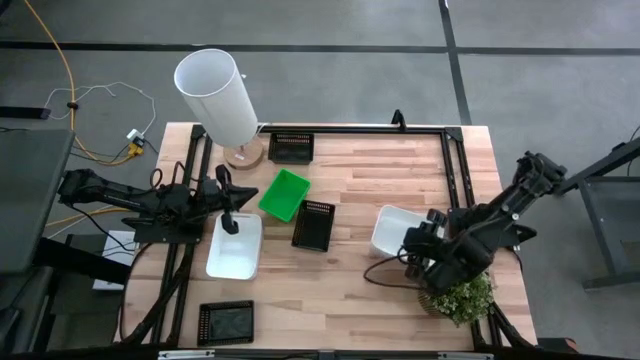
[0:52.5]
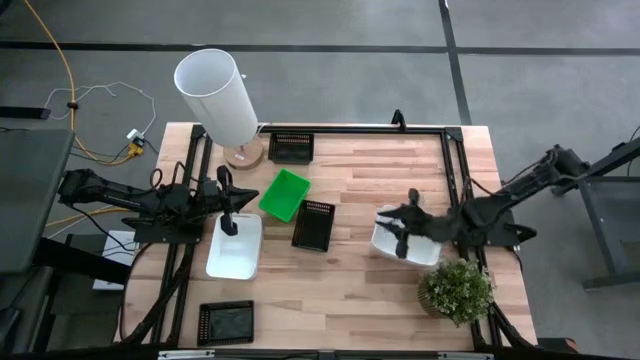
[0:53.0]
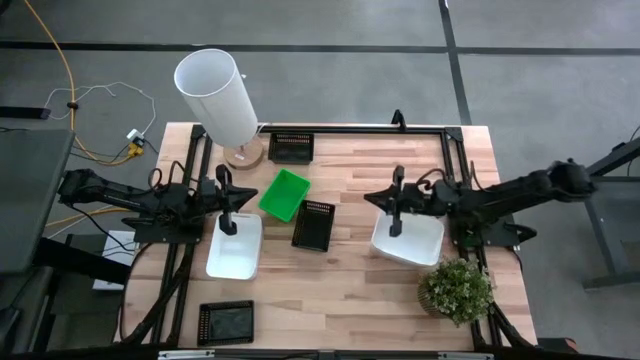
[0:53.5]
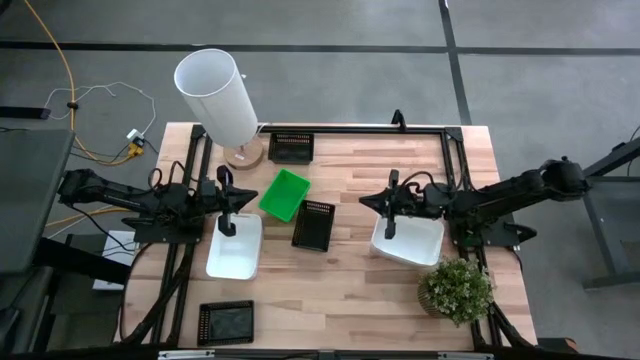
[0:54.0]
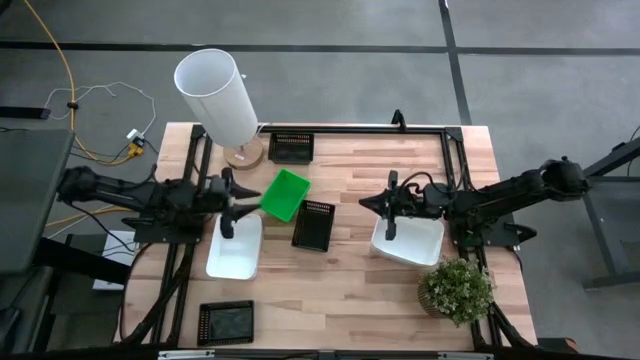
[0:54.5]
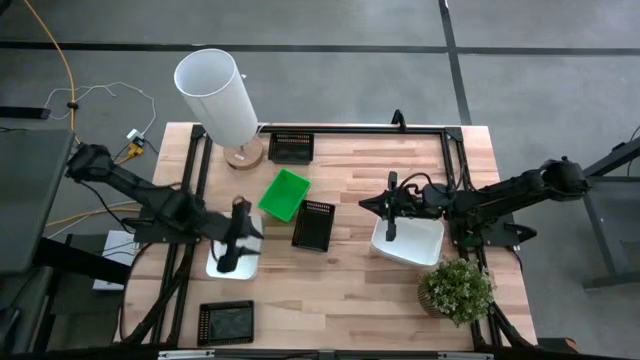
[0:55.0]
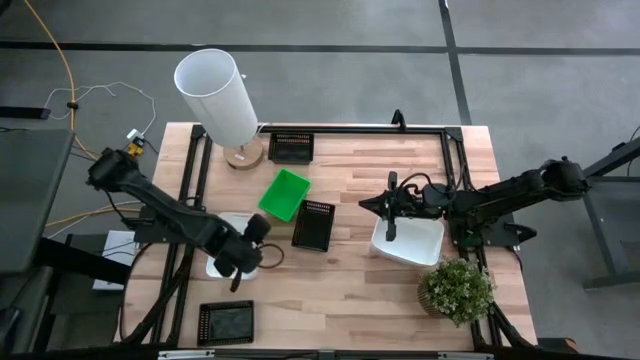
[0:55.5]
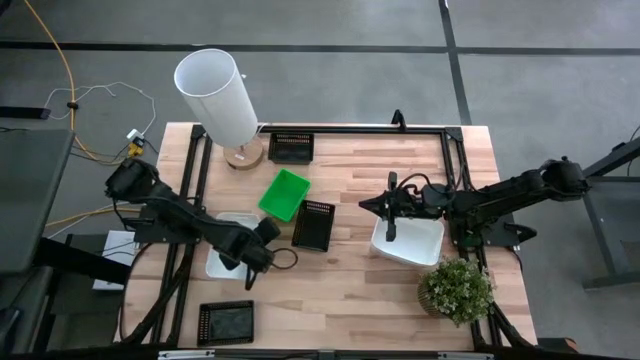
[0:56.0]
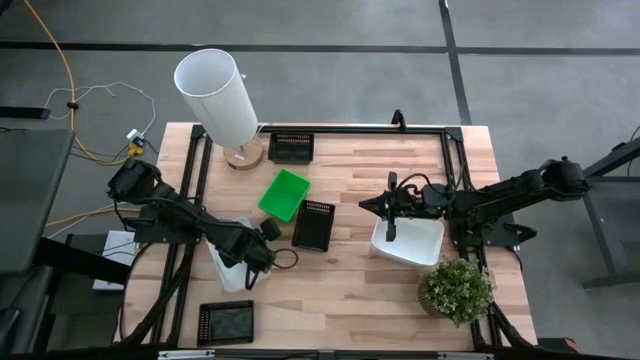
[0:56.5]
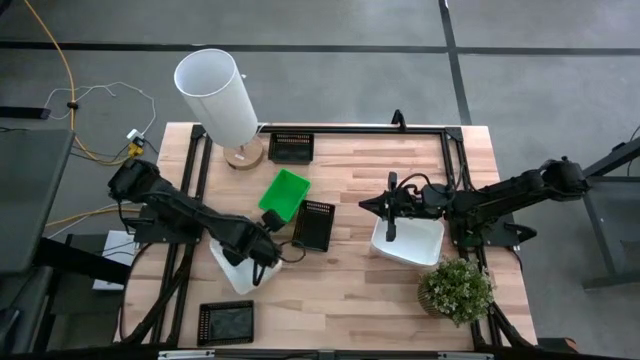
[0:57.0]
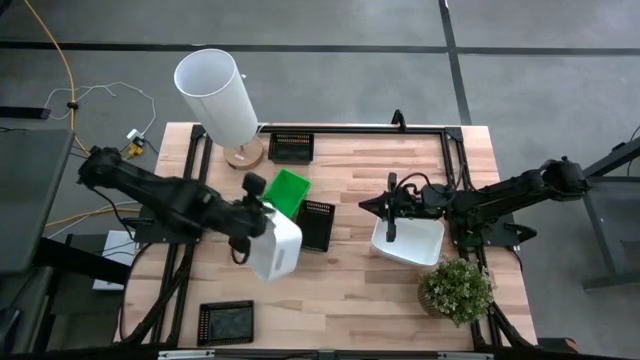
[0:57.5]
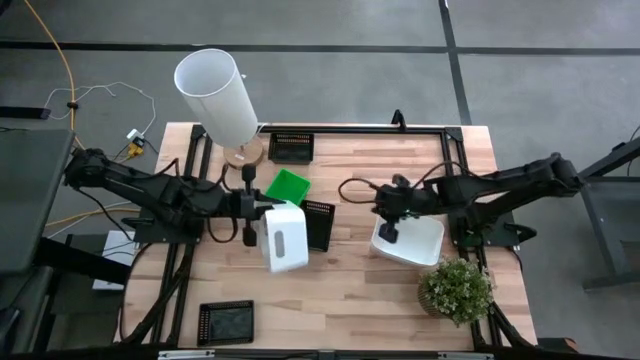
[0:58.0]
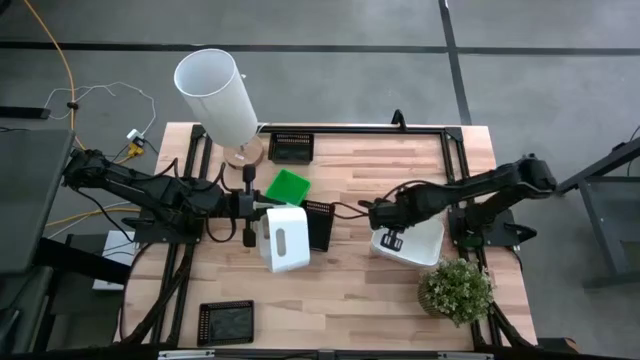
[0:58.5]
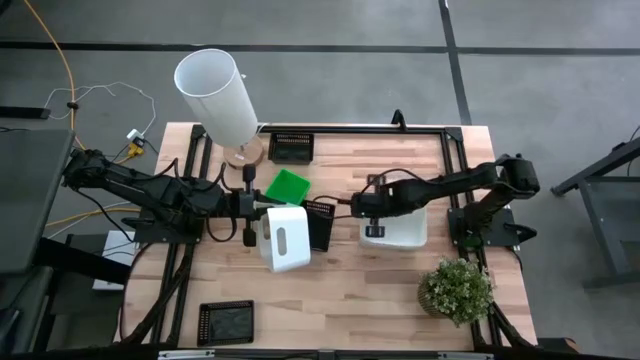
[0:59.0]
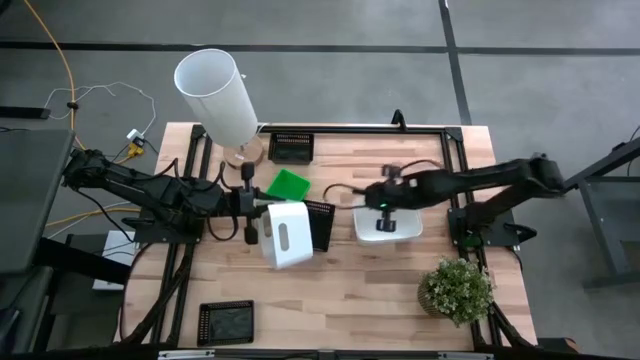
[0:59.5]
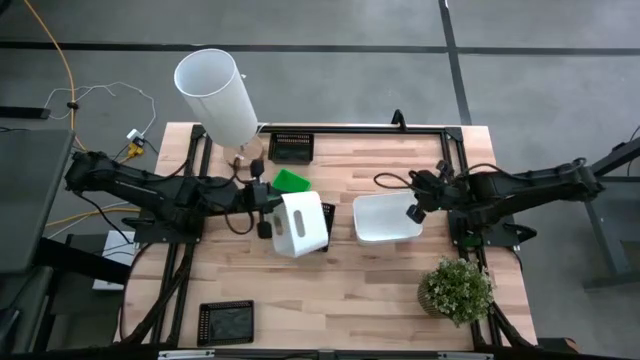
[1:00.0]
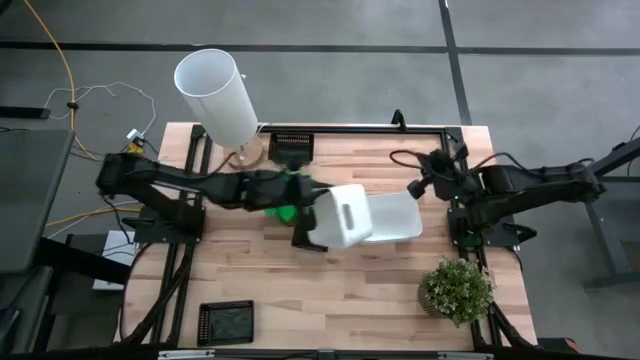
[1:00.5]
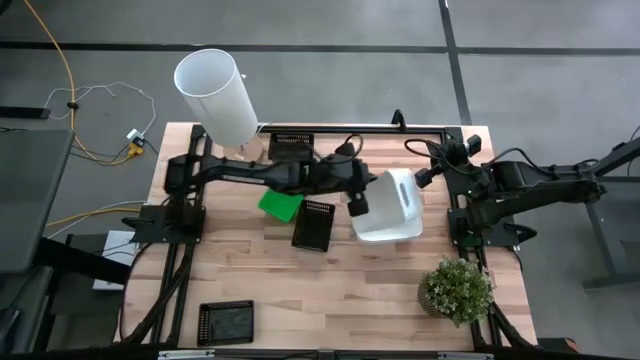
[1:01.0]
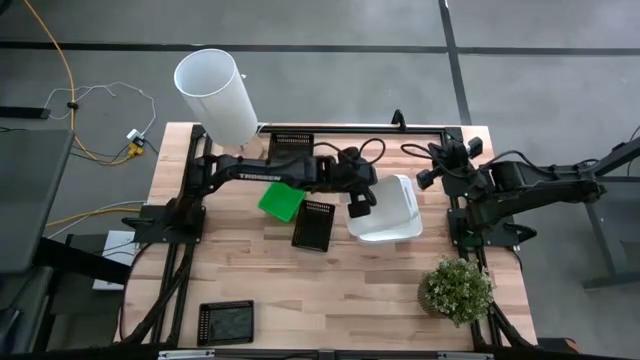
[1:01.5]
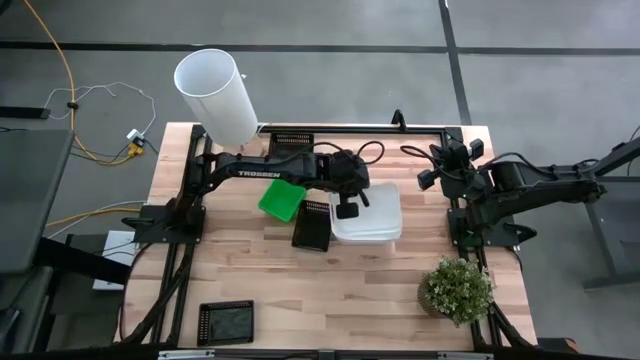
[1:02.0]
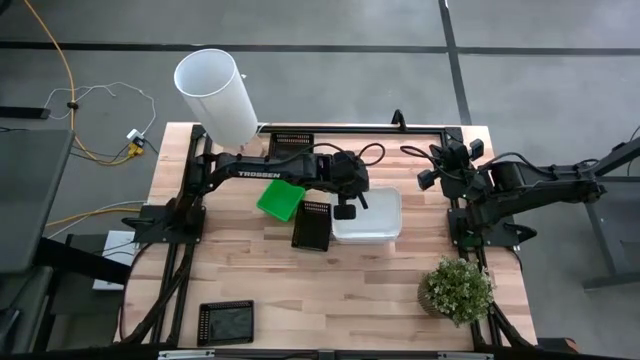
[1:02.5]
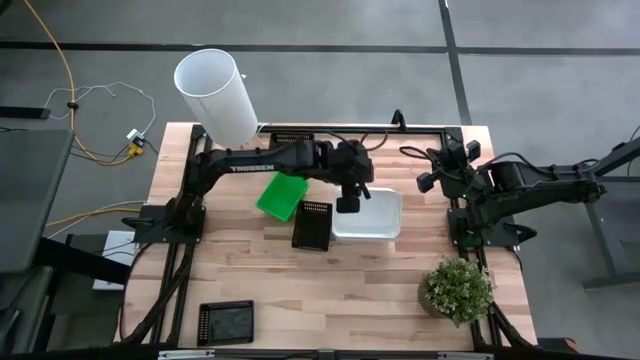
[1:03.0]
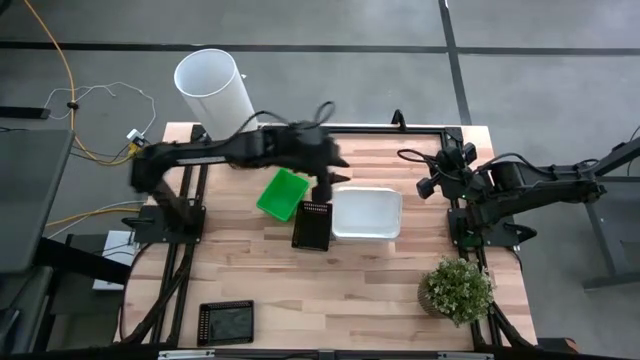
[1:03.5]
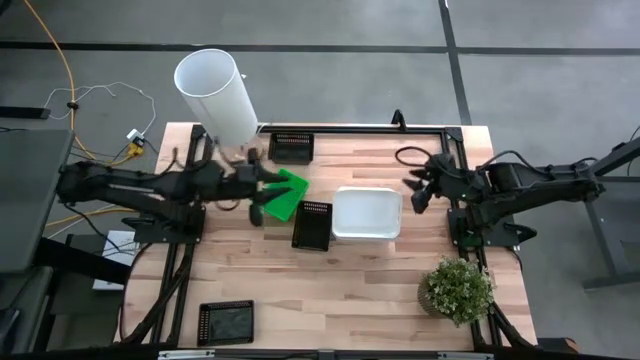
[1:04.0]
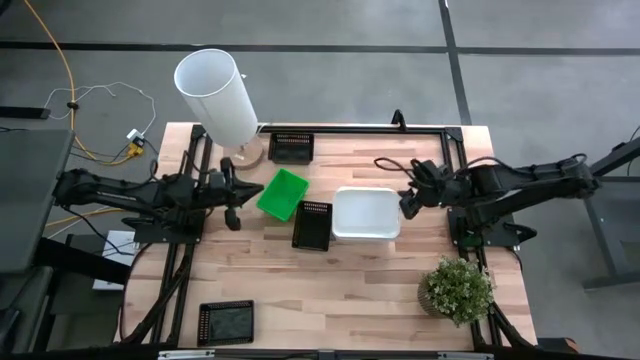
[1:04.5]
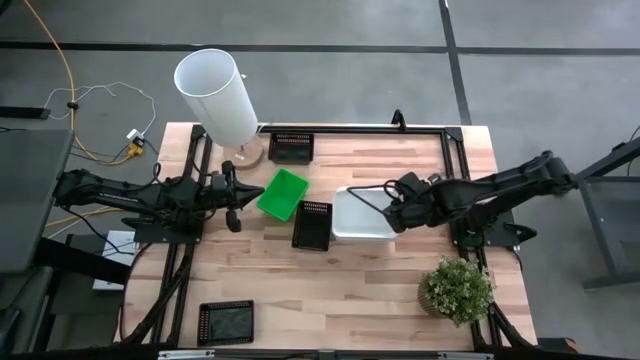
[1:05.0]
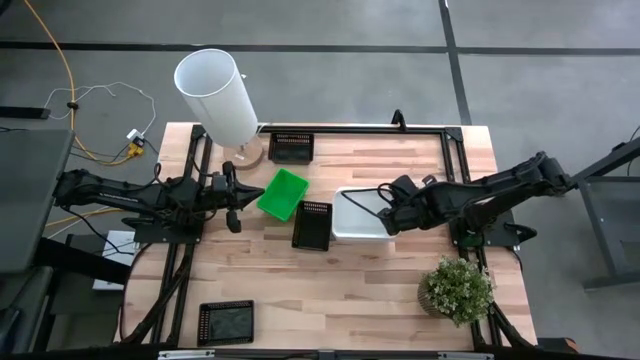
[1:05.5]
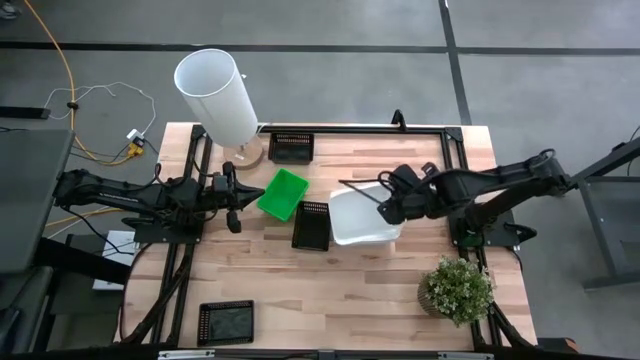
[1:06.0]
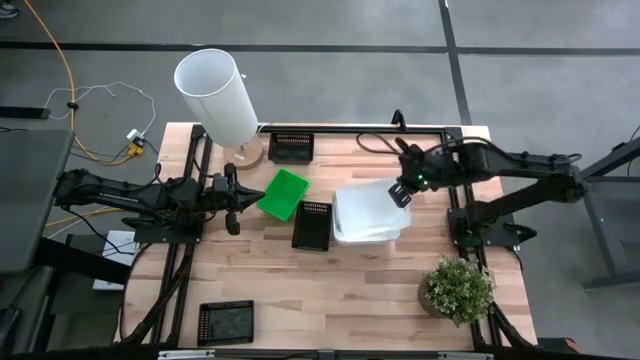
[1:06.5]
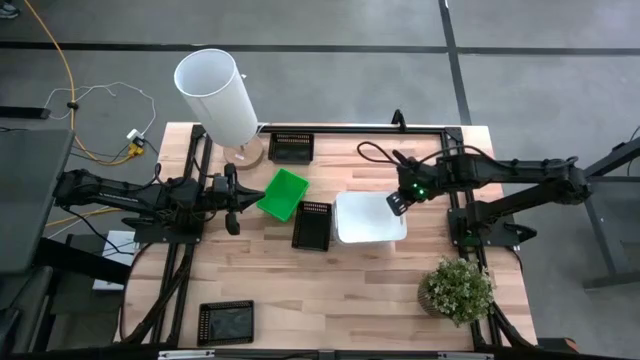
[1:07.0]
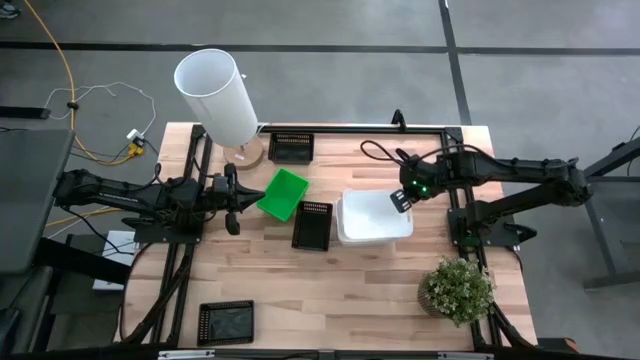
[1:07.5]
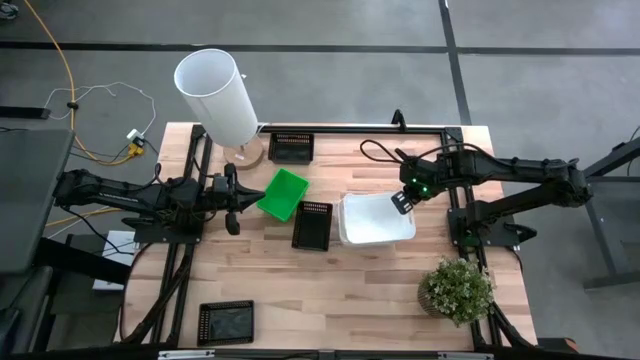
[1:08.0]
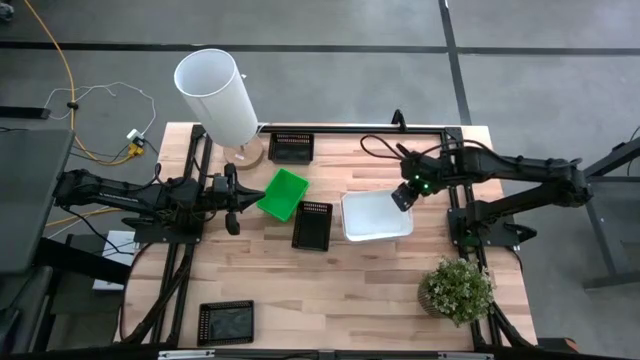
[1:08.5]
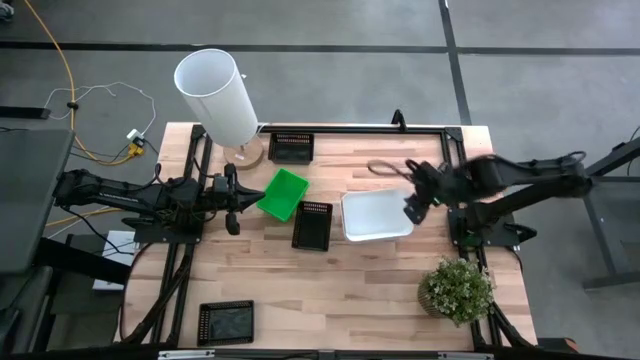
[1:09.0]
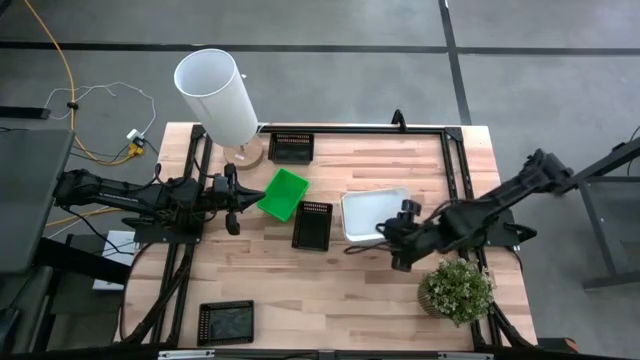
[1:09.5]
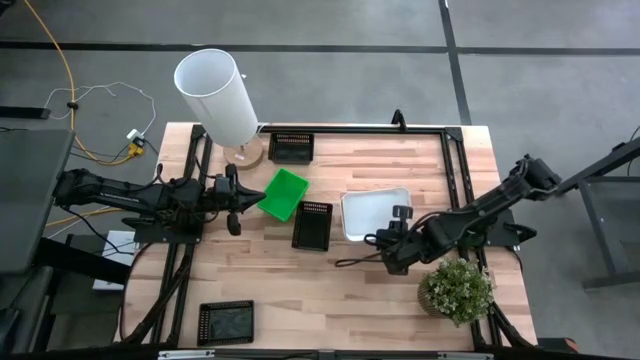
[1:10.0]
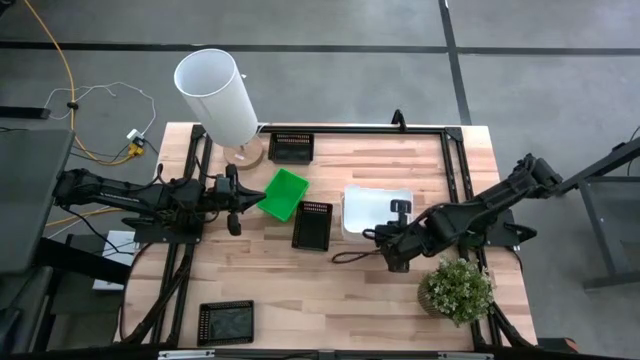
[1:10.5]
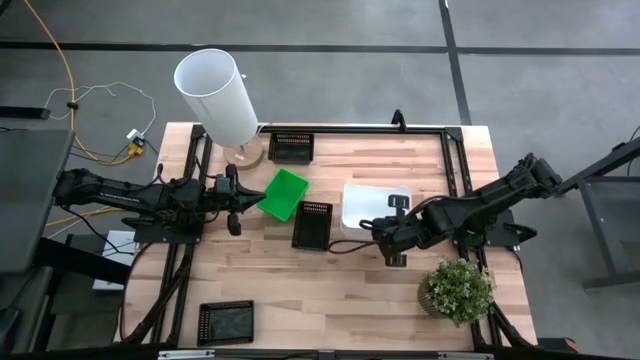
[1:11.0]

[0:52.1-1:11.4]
Stack the left white bin on the right white bin
